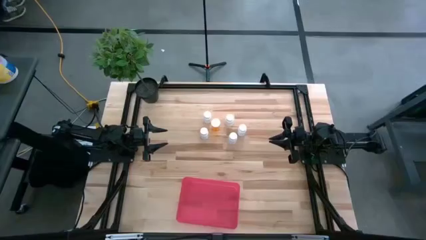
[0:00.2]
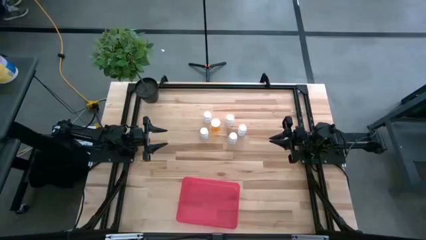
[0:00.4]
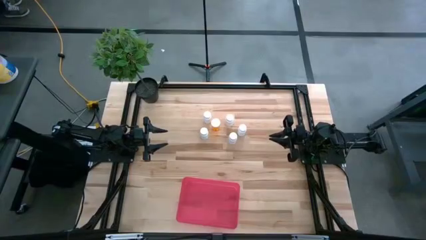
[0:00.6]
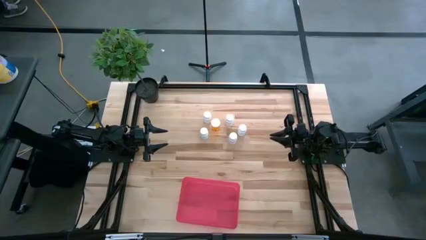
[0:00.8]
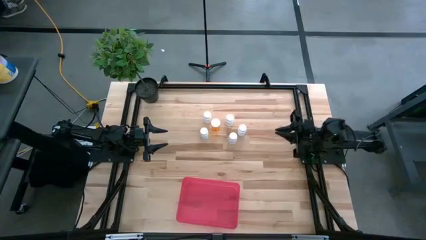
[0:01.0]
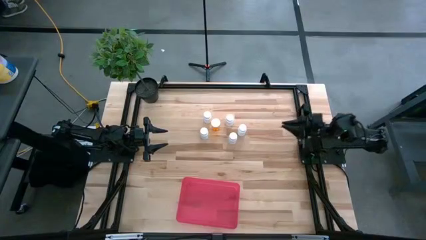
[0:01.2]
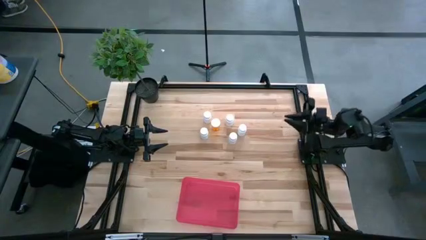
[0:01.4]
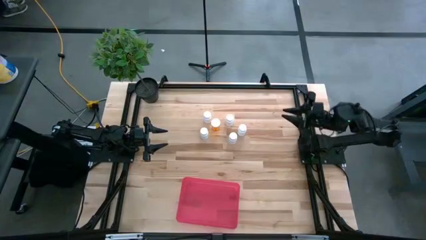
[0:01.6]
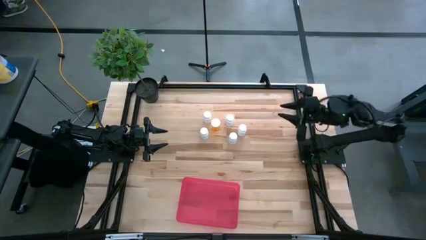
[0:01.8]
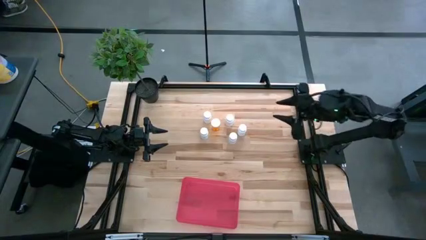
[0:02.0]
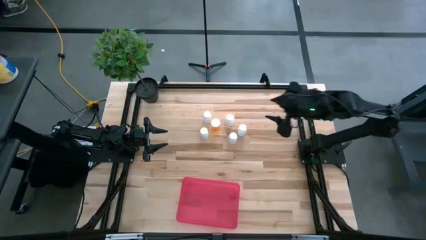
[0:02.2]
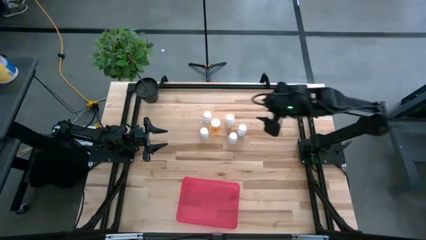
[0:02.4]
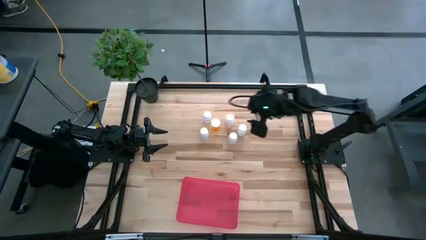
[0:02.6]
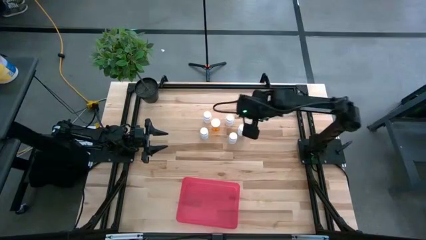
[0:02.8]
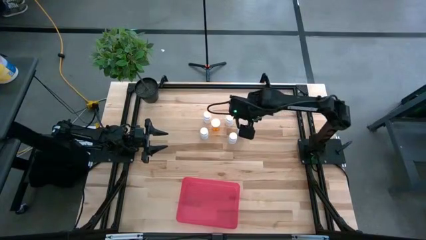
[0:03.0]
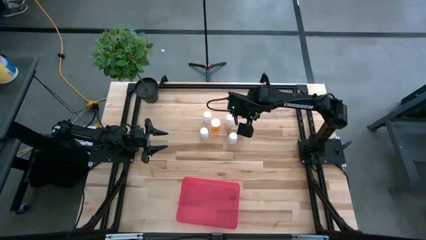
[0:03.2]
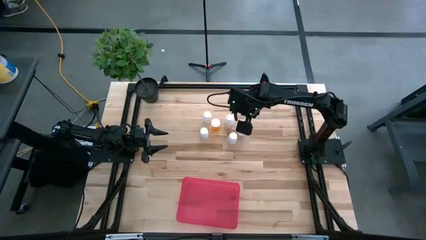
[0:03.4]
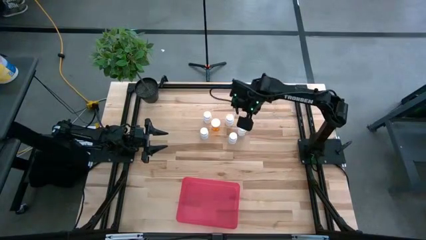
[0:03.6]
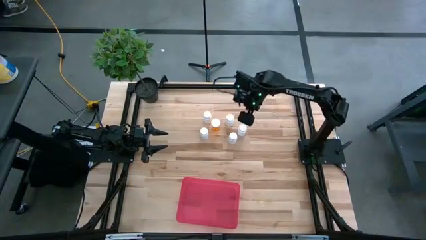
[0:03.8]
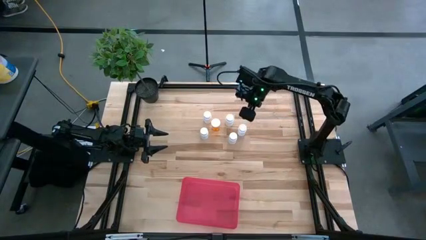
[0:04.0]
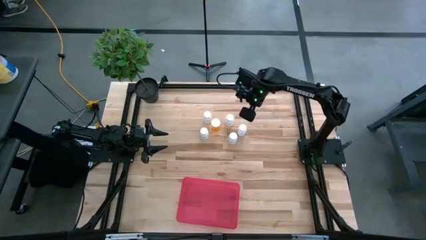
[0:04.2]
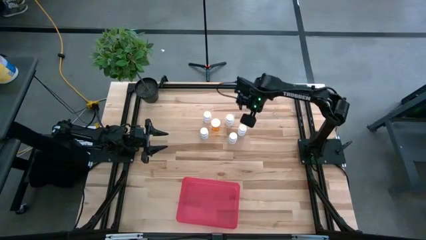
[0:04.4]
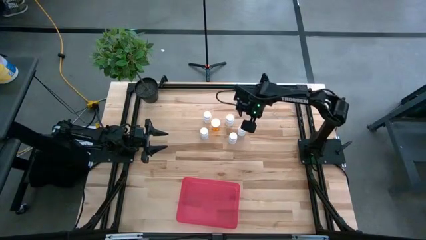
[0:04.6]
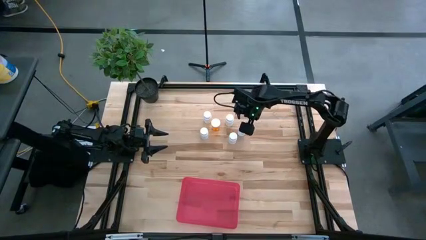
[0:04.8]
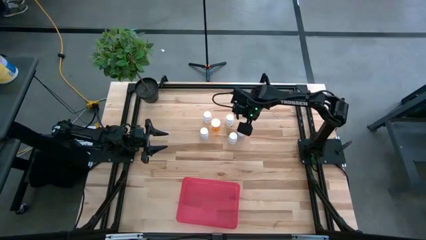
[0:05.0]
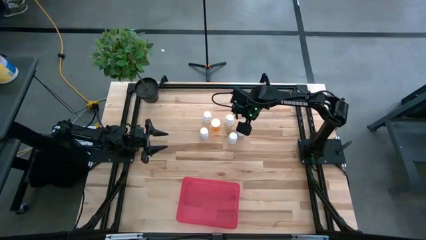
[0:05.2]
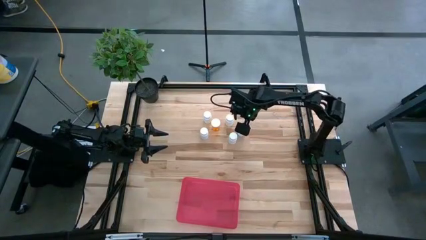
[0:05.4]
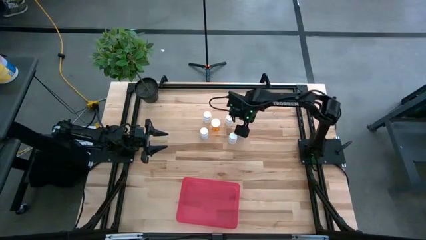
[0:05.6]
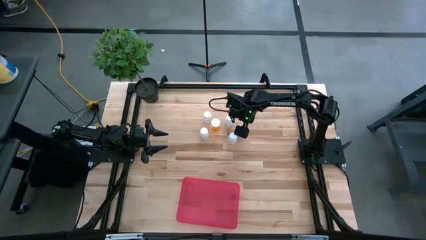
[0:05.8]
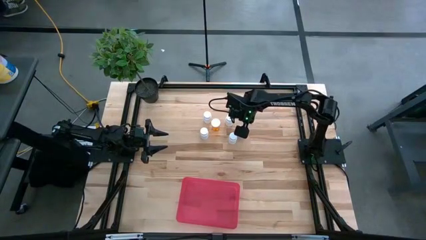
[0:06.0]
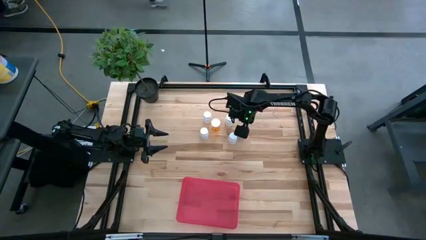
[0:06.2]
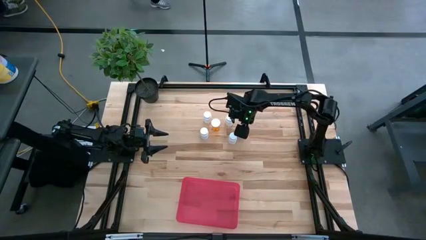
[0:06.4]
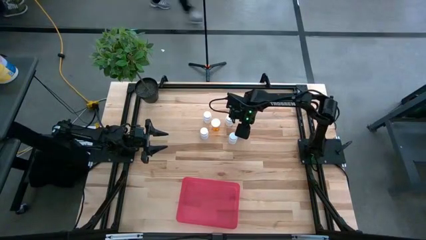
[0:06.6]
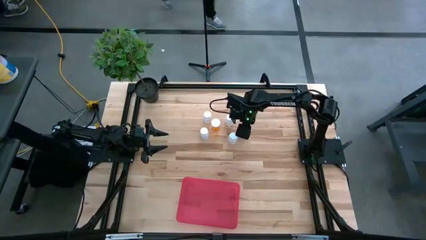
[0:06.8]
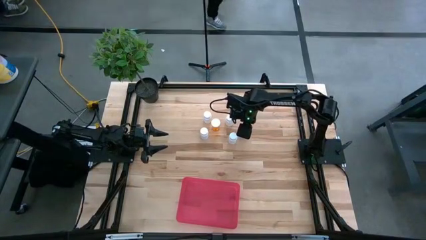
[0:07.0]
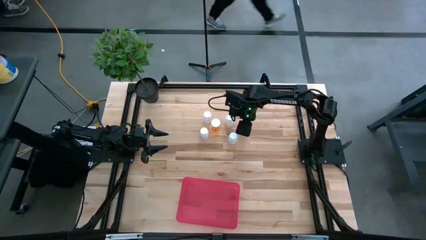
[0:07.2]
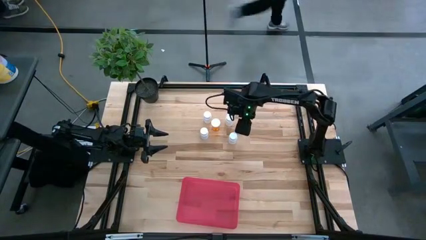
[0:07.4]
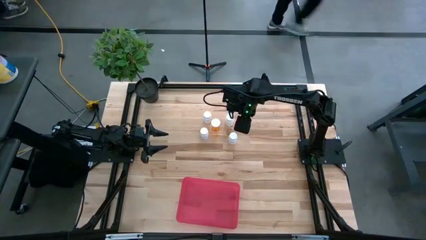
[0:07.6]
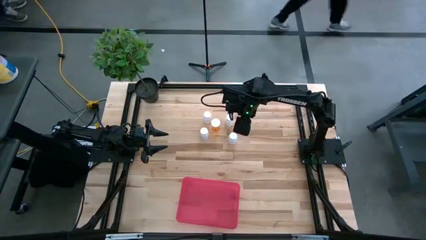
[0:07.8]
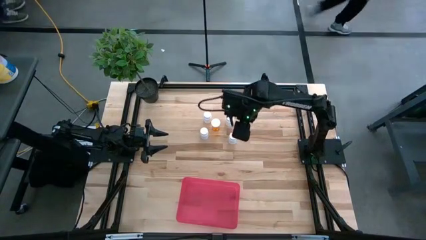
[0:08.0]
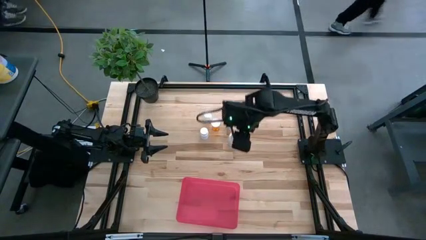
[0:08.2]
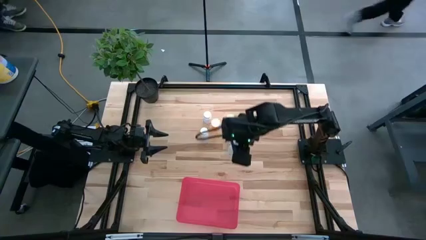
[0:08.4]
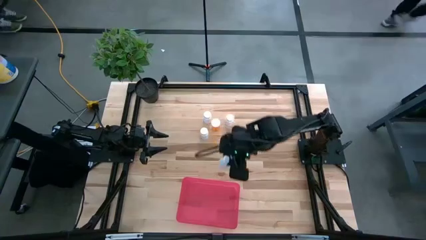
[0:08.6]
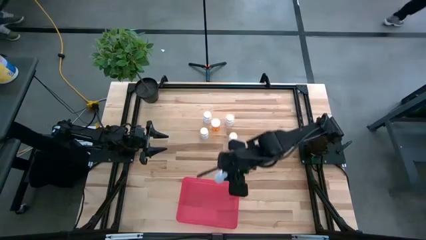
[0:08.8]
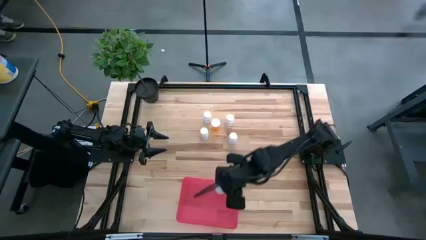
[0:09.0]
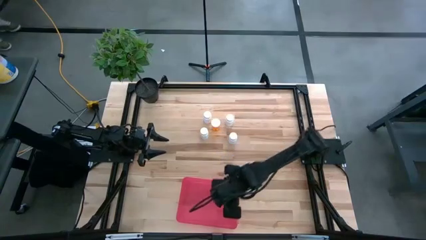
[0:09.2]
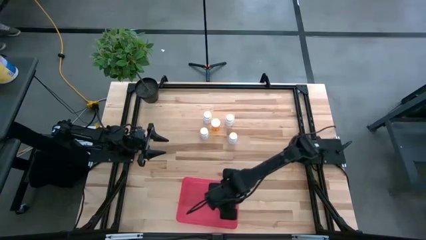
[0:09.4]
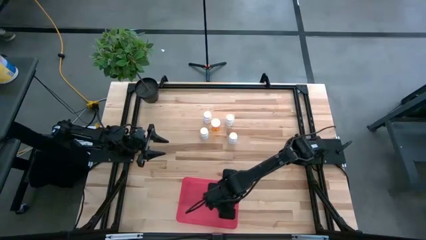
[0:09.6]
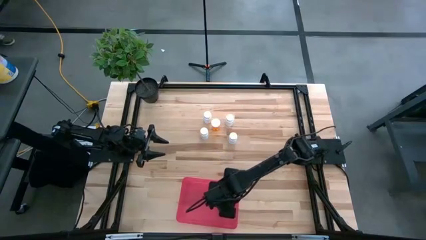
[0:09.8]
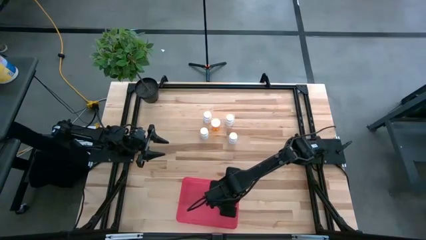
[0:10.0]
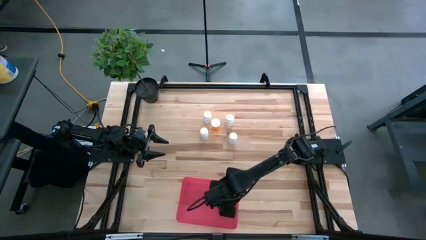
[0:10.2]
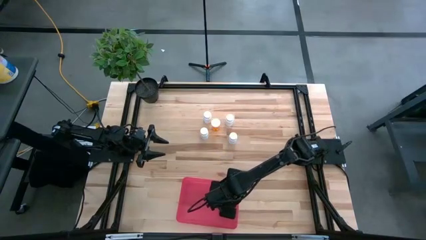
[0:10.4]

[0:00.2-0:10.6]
Task: Pick and place pill bottles into a basket
Put the white pill bottle into the red bin

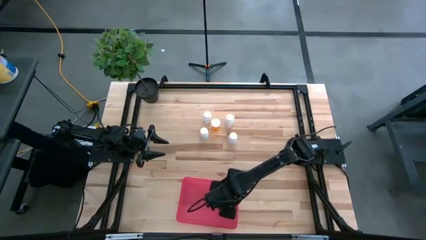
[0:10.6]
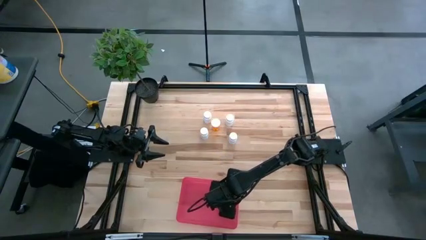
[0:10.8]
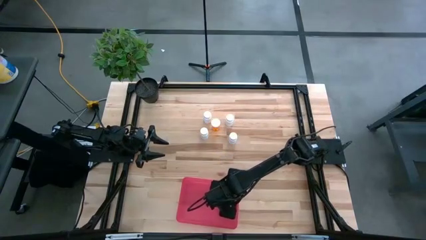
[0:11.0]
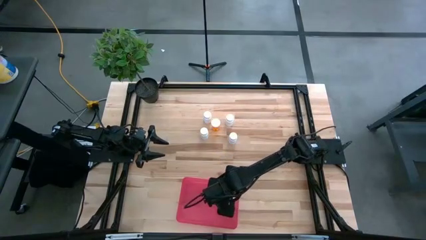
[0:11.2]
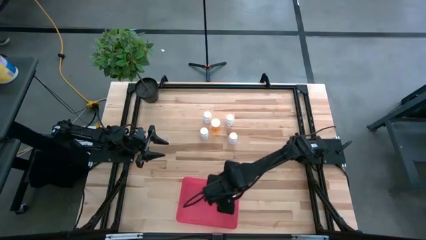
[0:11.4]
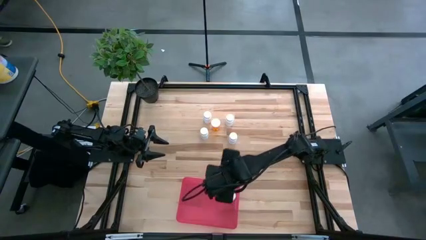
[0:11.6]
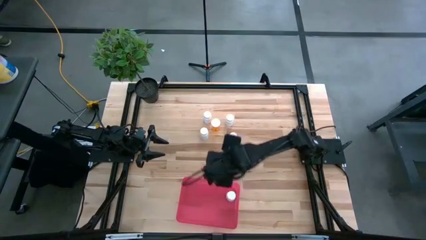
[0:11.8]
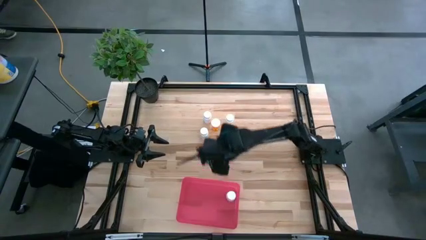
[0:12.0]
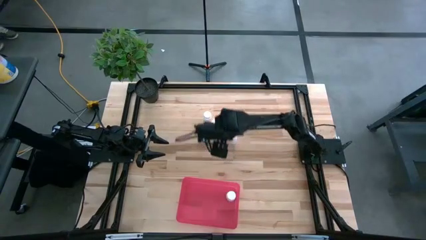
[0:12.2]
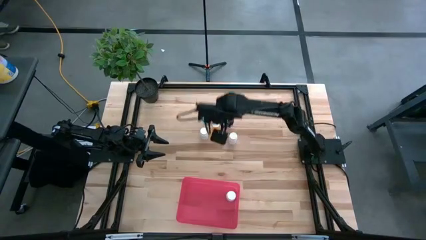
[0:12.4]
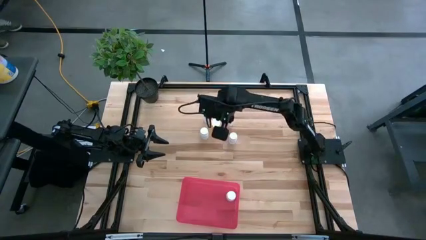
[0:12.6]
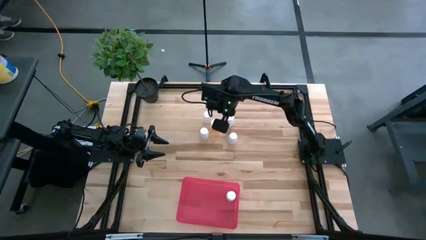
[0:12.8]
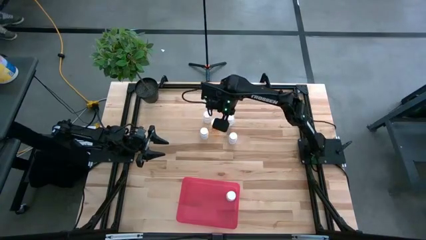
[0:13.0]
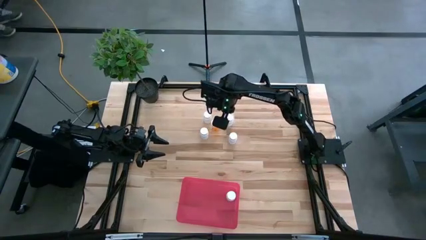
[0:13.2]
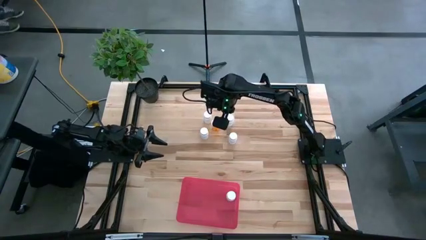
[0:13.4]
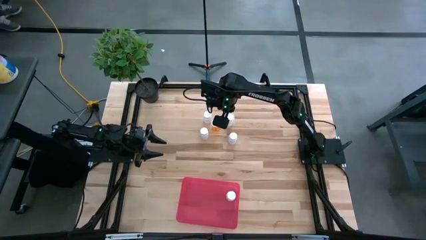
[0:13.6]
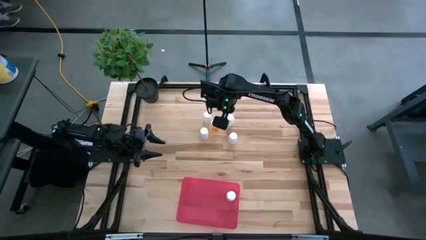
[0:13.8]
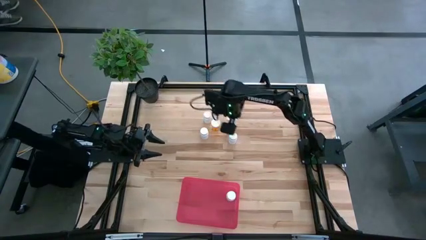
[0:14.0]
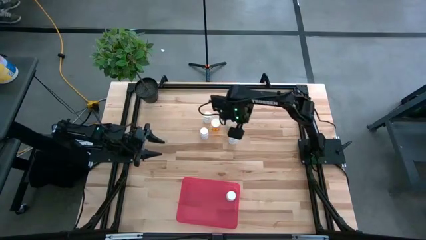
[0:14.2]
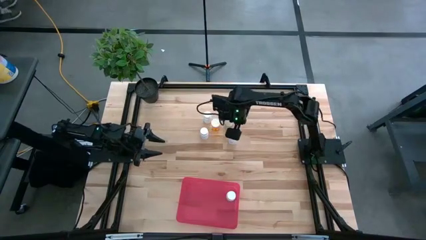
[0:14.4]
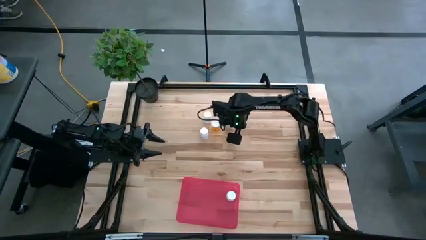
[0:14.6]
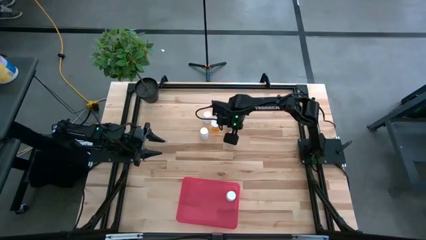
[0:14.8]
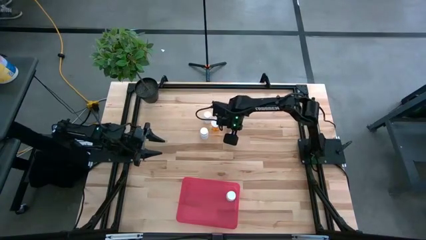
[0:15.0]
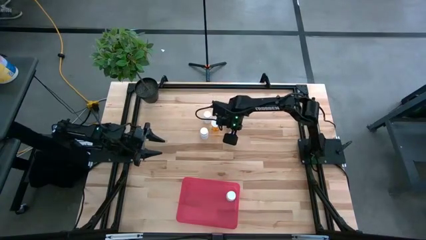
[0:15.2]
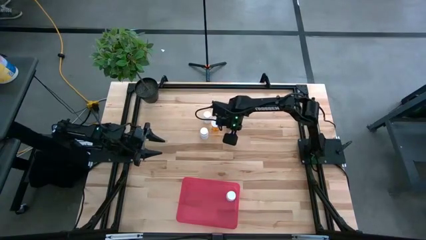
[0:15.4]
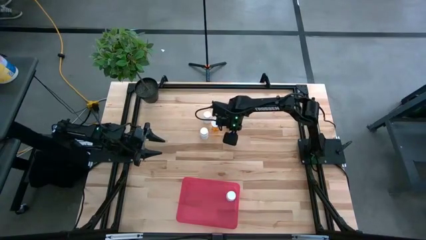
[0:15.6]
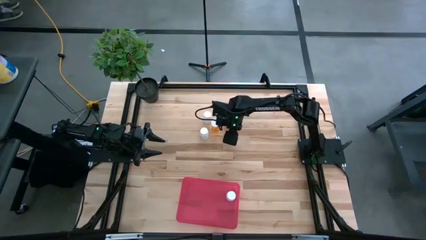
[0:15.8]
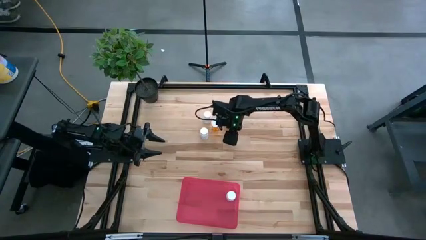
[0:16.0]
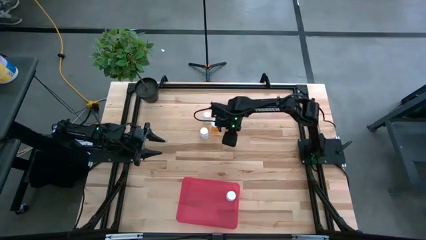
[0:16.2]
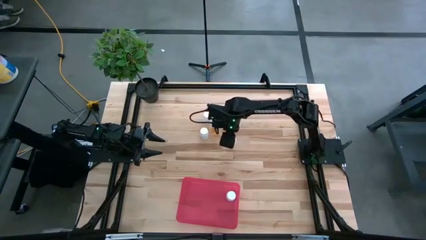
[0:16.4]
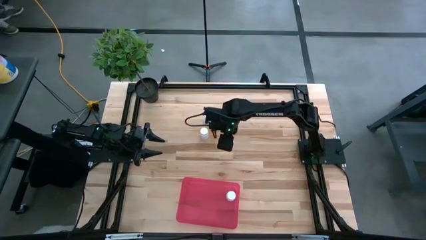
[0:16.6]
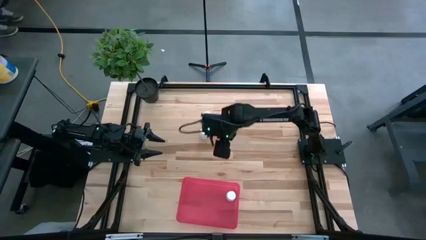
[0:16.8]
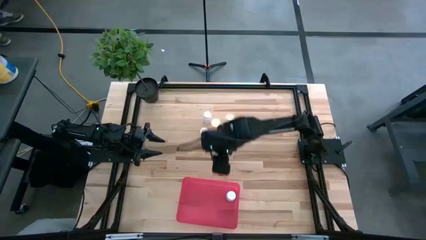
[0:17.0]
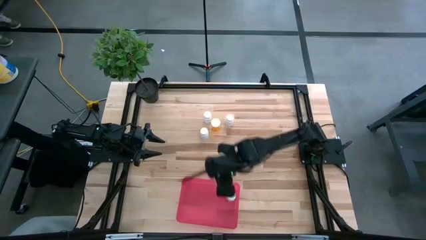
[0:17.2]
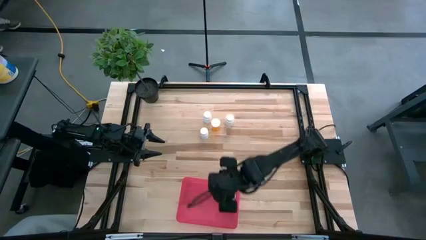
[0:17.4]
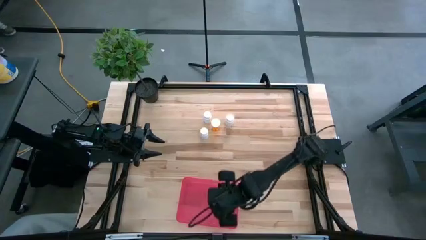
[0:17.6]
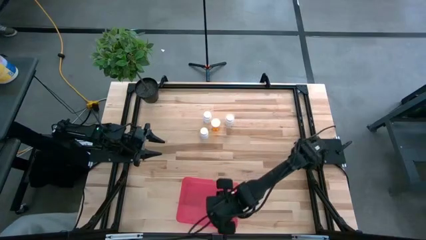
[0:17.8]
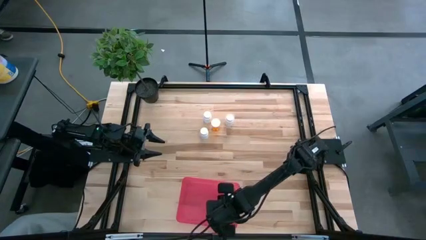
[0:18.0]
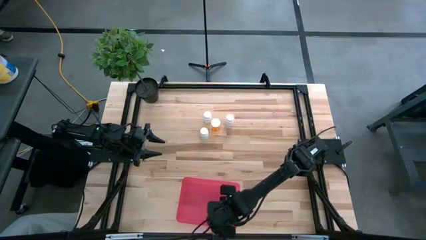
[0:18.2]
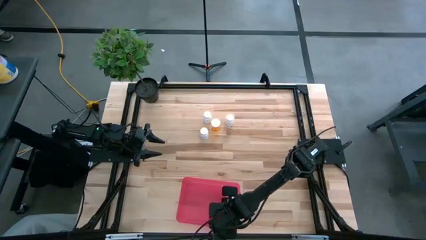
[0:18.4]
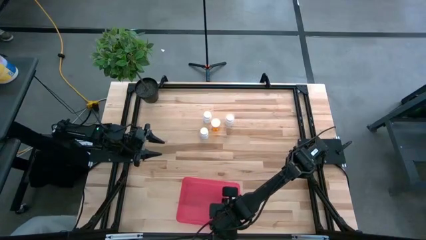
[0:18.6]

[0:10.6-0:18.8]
Put the white pill bottle into the red bin
